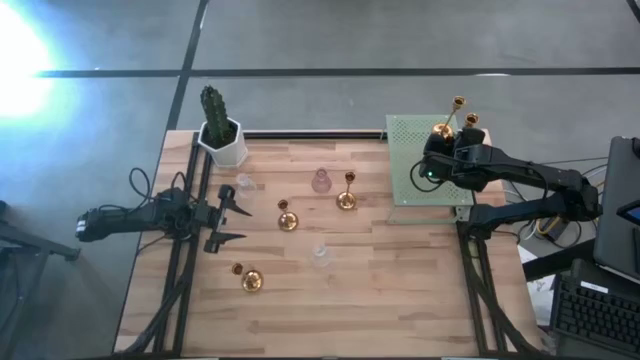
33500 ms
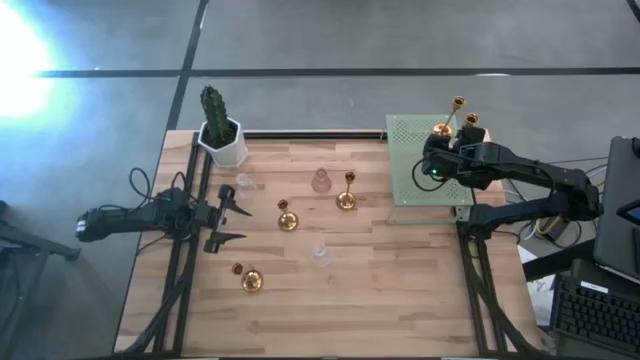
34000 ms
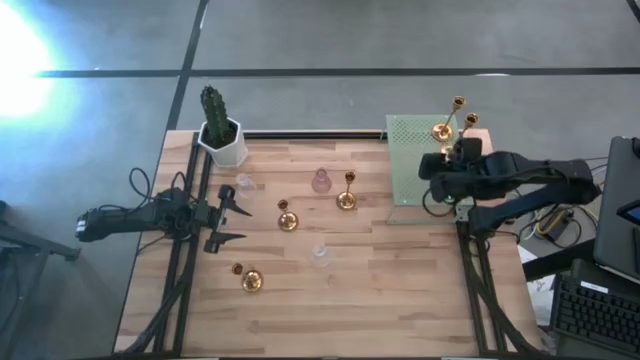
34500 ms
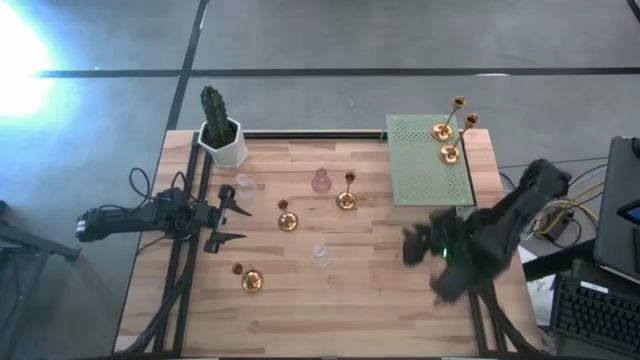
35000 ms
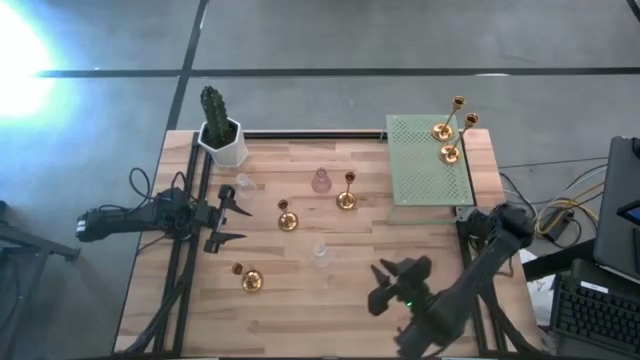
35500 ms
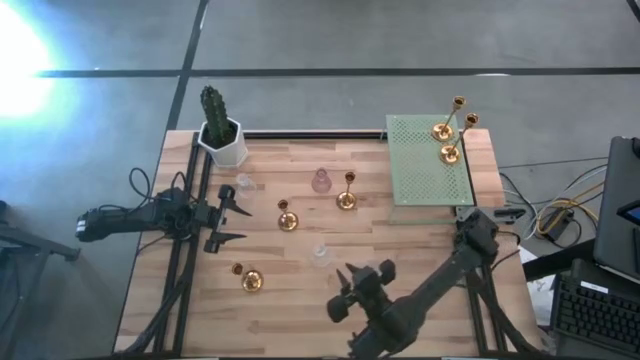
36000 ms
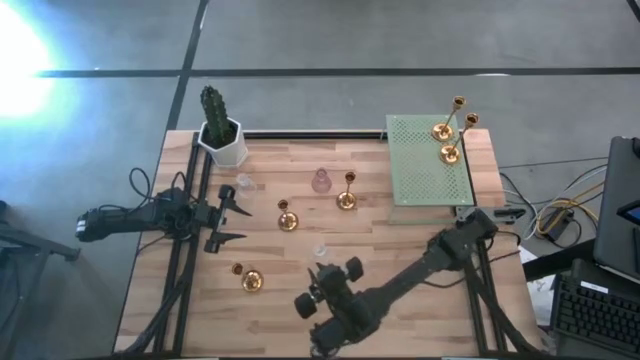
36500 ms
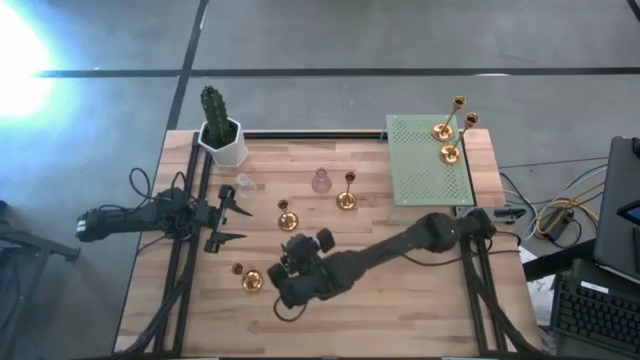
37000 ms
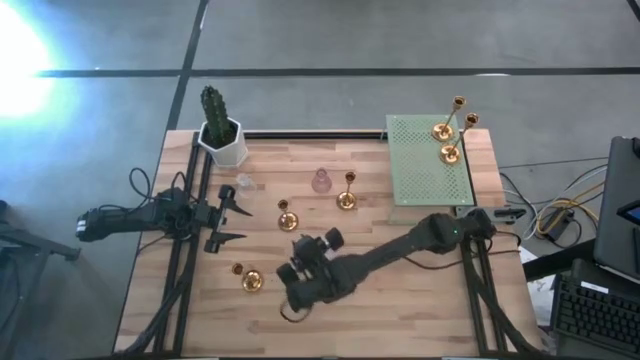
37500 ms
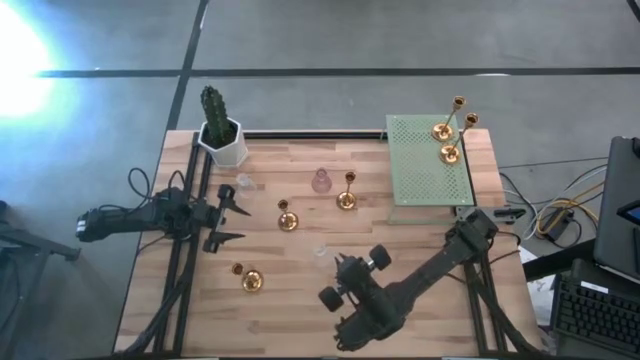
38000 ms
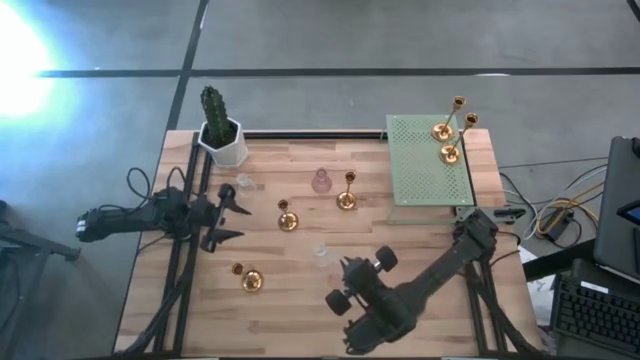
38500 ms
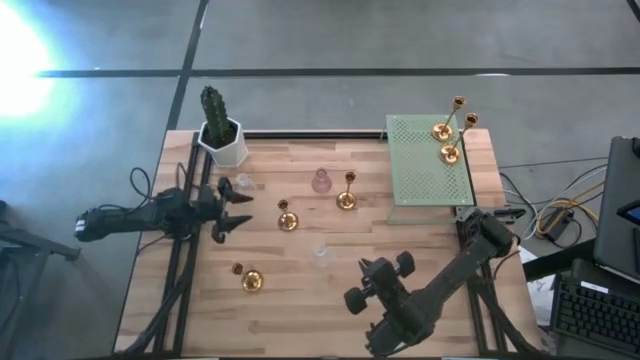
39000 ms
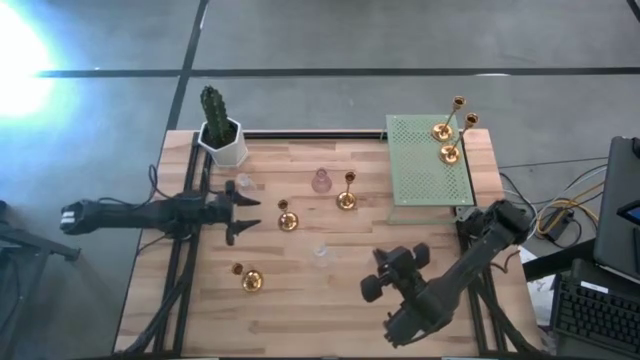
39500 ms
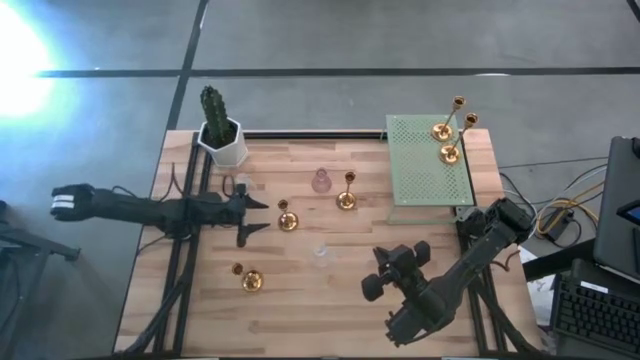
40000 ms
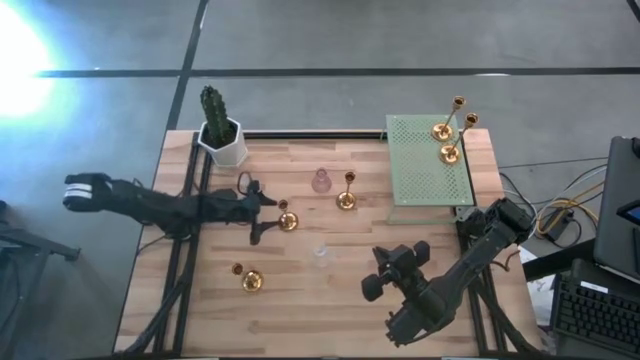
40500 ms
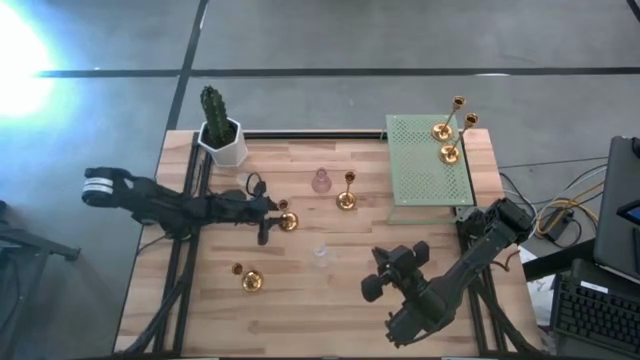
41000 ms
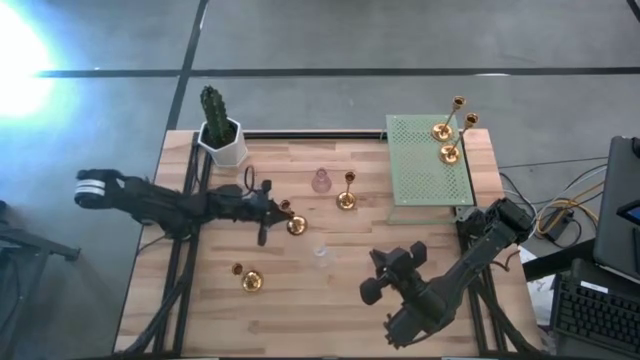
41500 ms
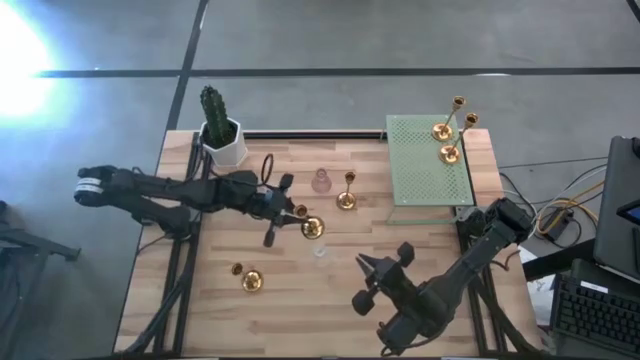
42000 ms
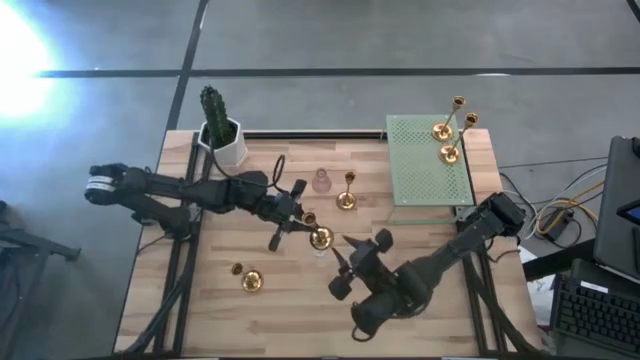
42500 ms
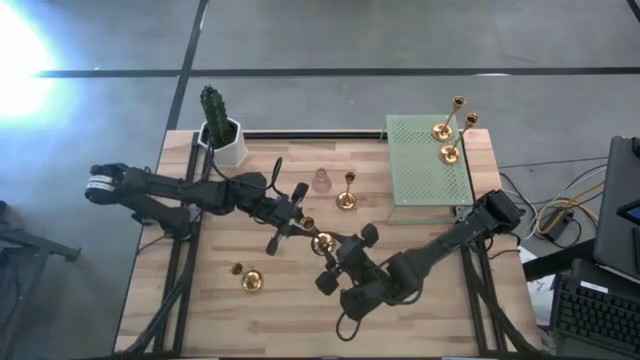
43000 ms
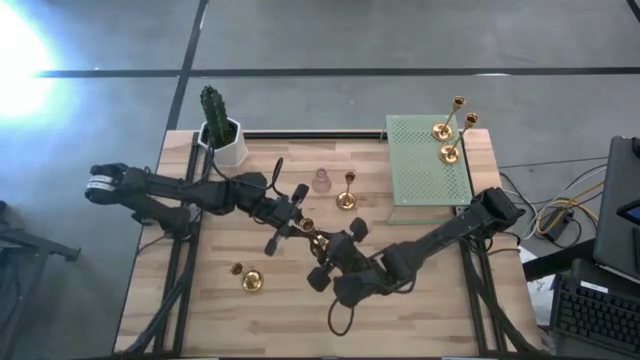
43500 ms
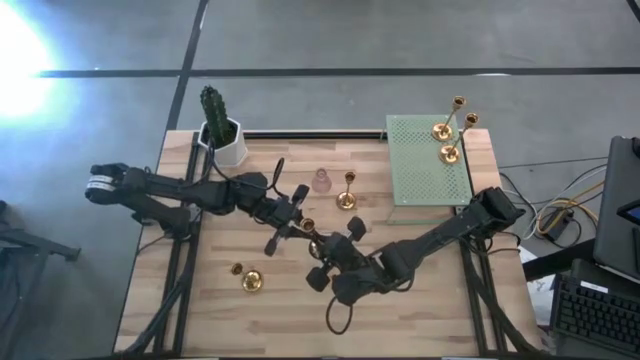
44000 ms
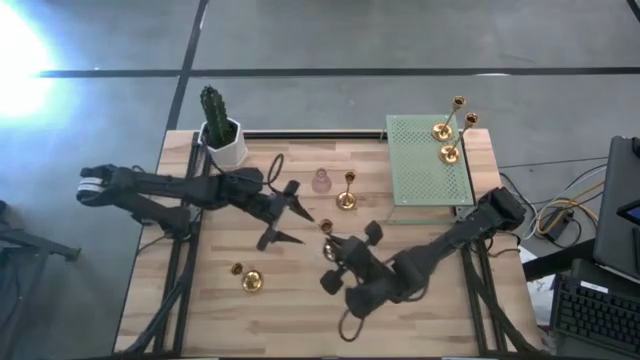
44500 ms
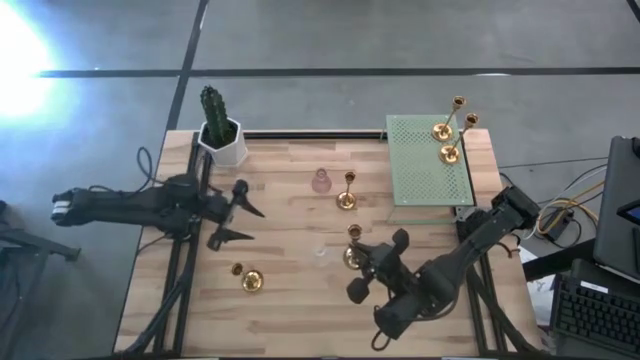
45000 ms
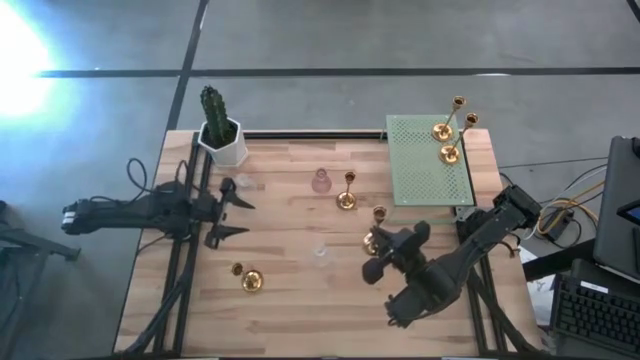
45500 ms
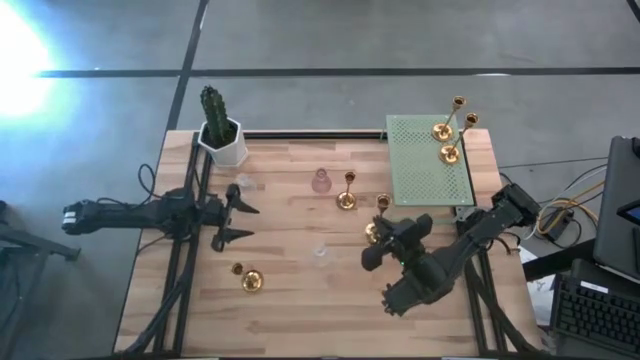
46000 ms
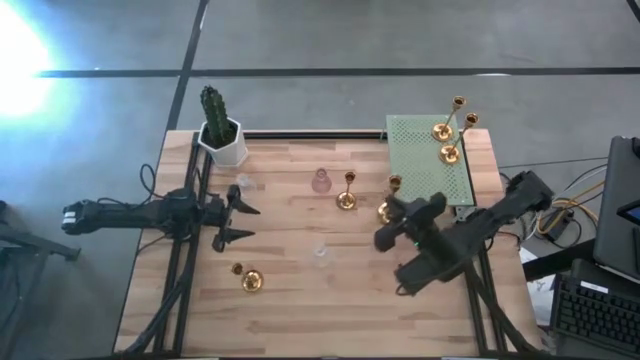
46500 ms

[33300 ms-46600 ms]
Task: Pick & Place candle stick holders
Put the middle gold candle holder on the shelf

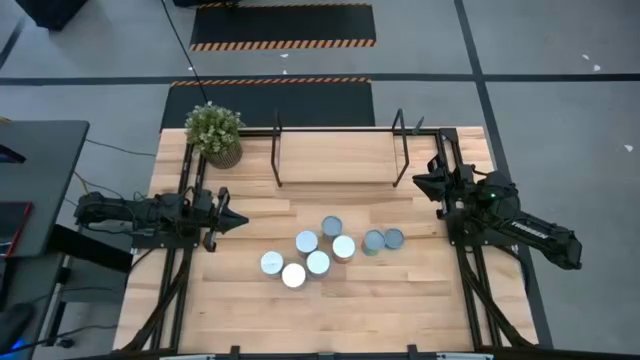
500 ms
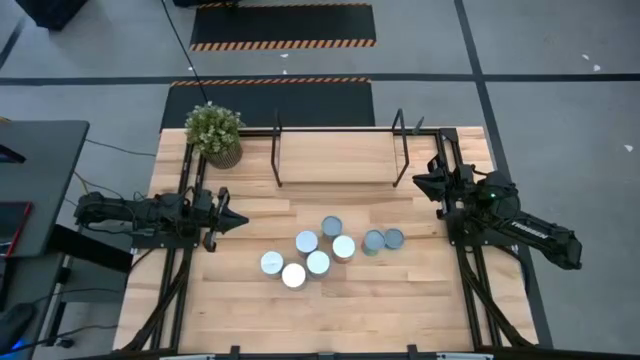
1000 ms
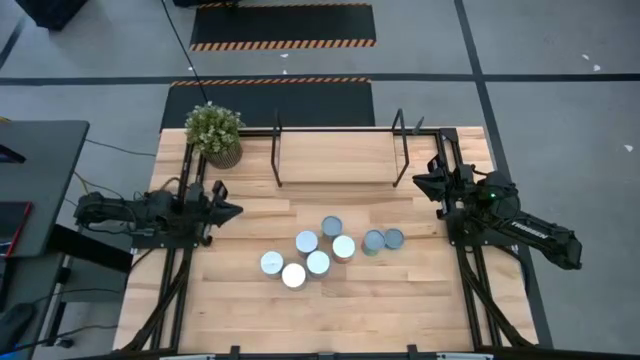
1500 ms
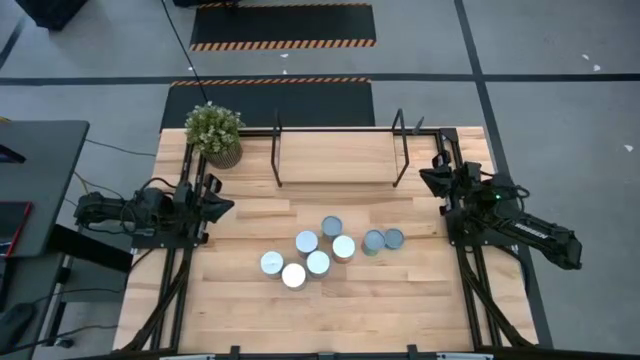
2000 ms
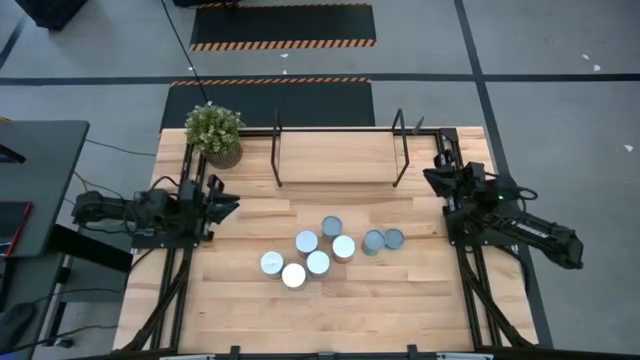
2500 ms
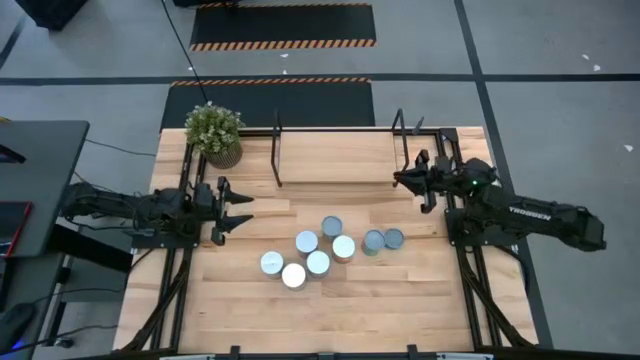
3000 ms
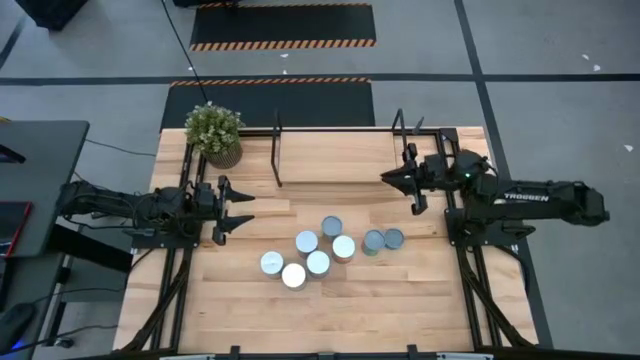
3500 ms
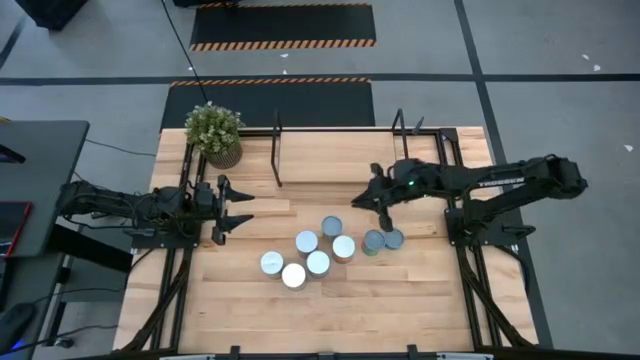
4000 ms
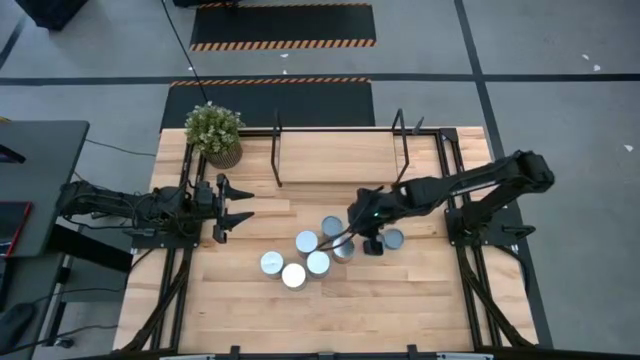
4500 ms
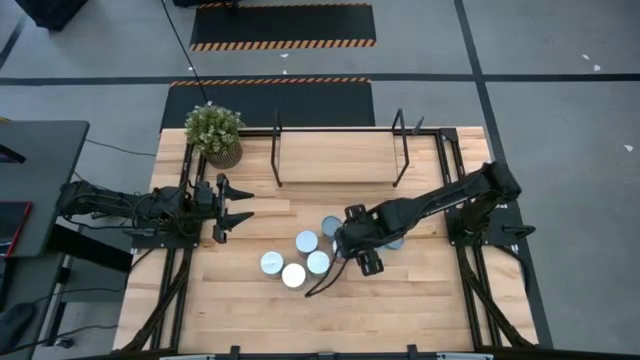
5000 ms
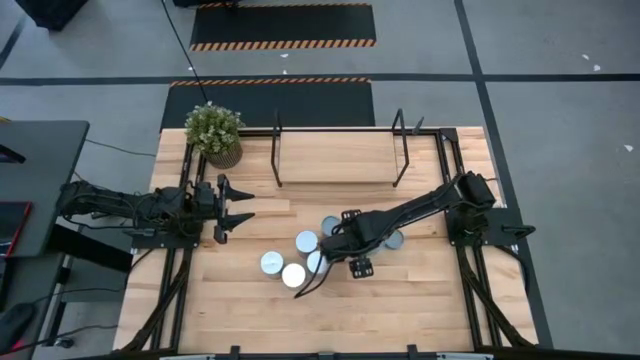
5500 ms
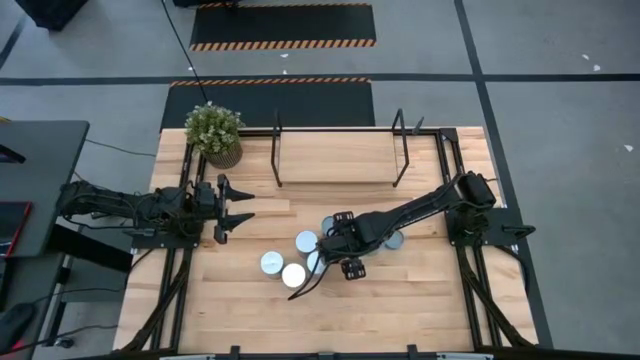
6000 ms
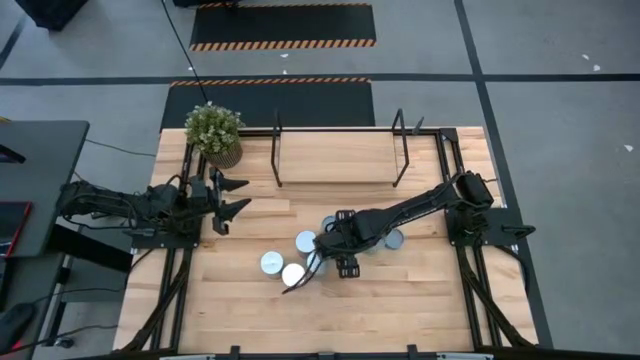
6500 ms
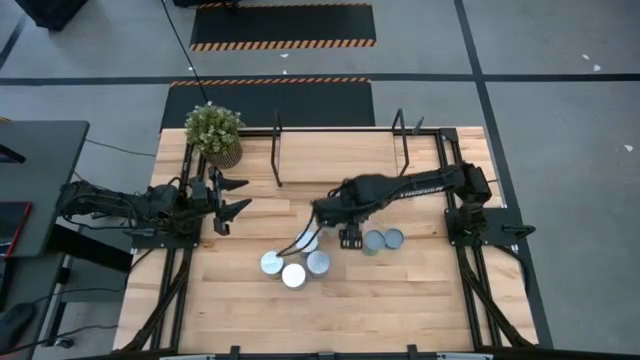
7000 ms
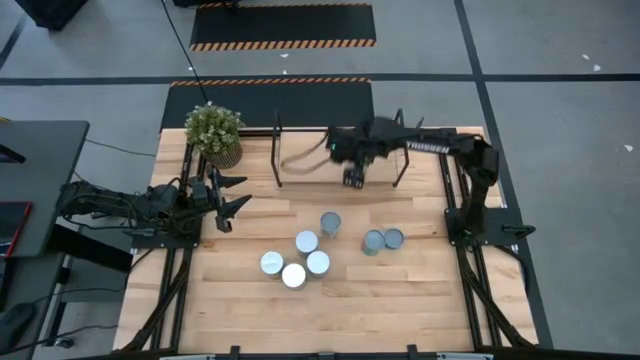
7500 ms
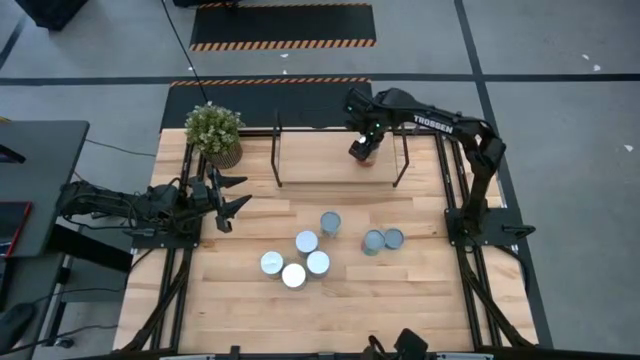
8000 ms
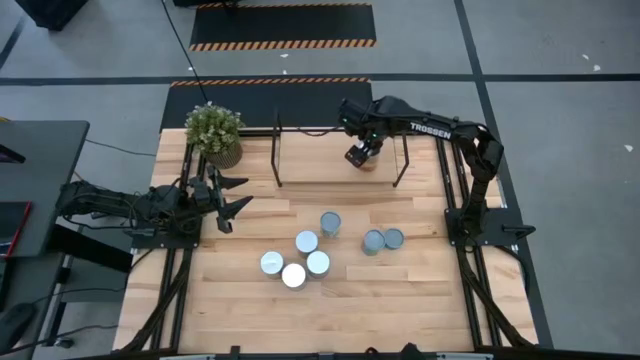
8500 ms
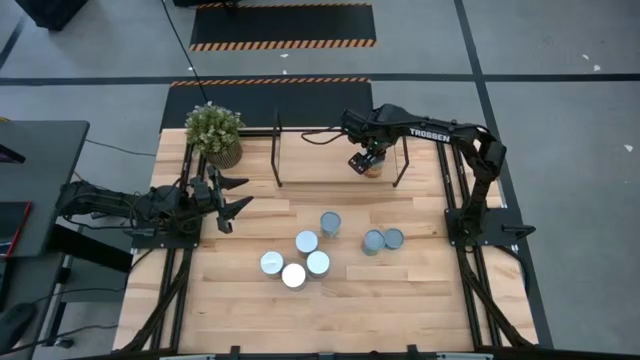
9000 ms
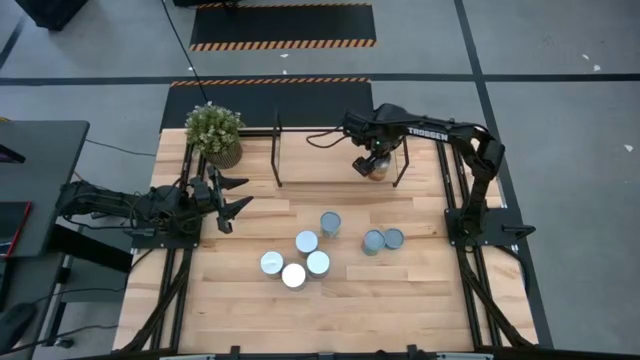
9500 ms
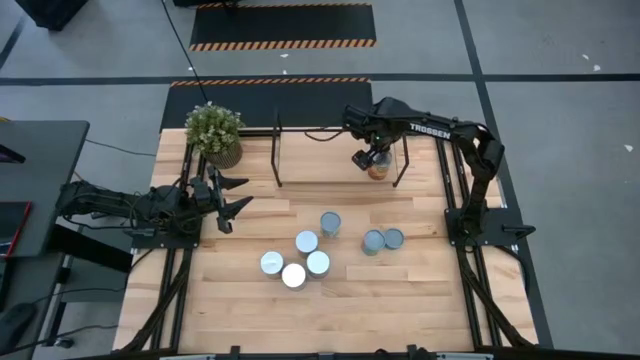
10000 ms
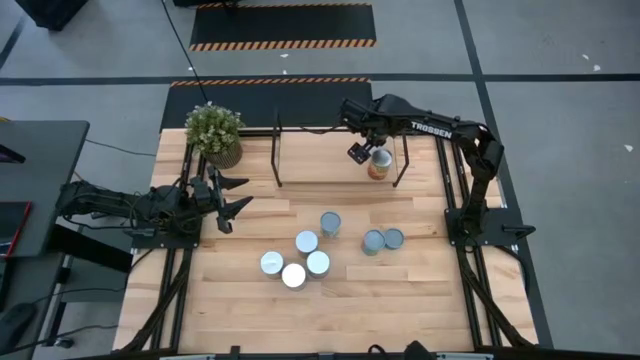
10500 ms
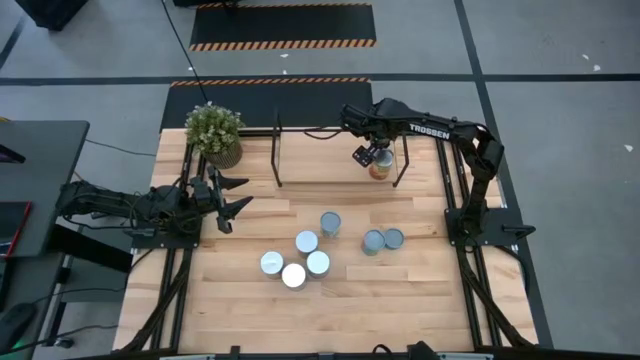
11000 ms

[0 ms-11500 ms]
Task: Pick and place cans onto a shelf
Put the canned corn on the shelf
